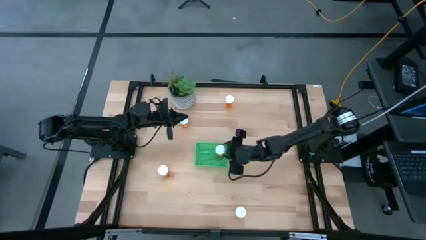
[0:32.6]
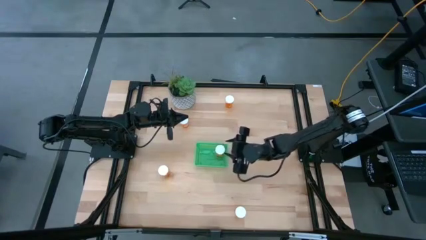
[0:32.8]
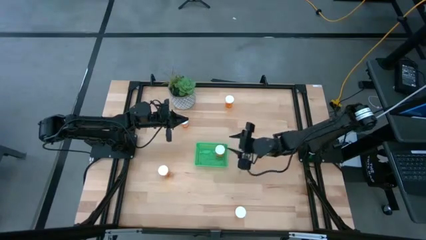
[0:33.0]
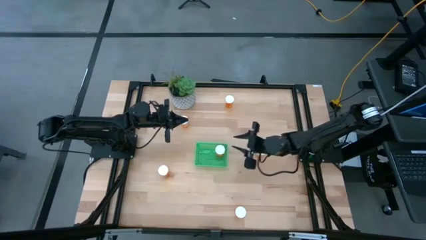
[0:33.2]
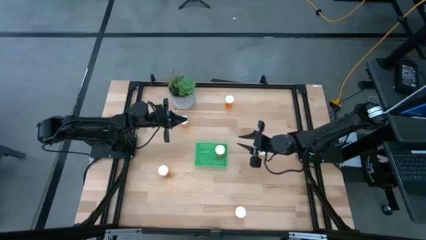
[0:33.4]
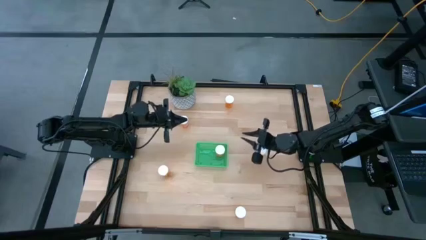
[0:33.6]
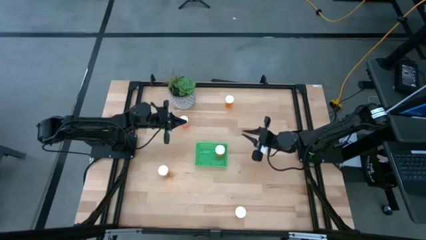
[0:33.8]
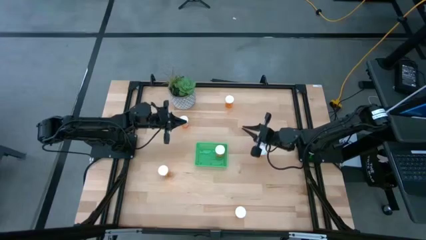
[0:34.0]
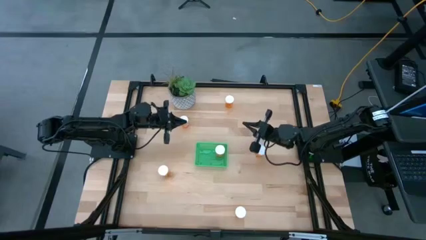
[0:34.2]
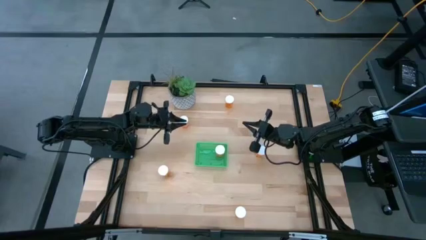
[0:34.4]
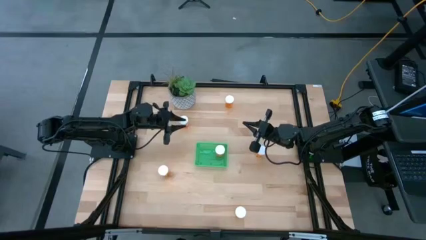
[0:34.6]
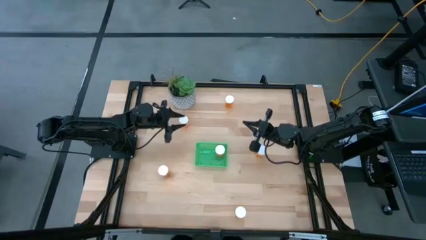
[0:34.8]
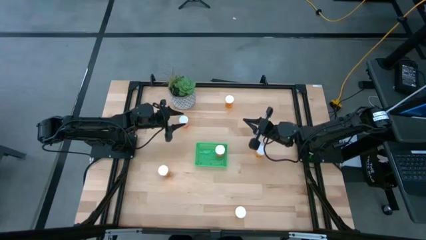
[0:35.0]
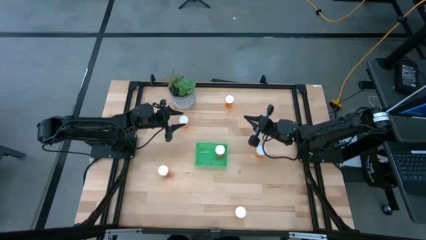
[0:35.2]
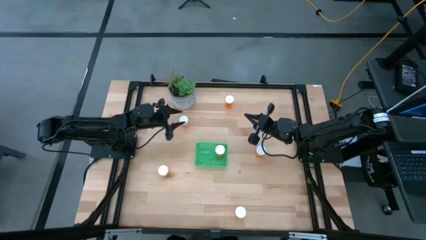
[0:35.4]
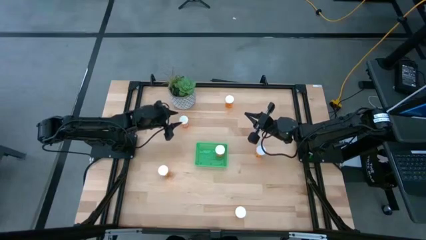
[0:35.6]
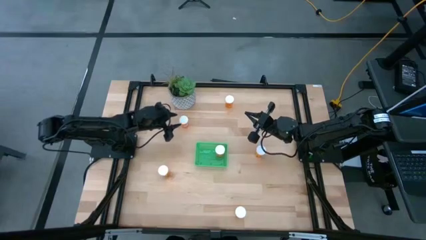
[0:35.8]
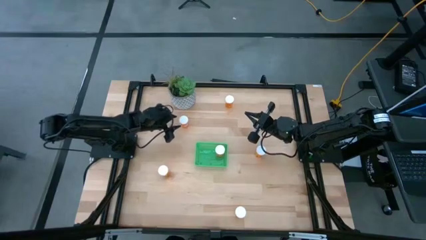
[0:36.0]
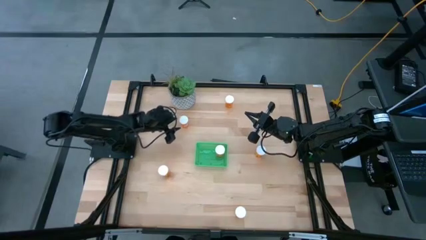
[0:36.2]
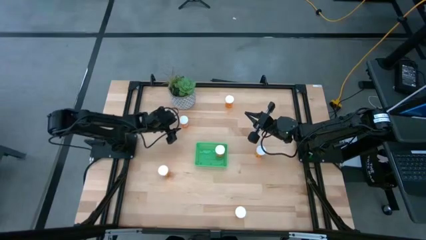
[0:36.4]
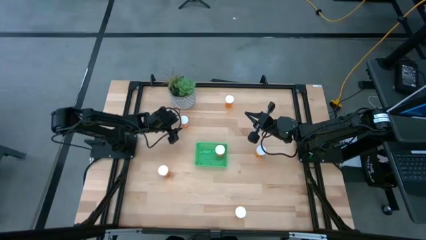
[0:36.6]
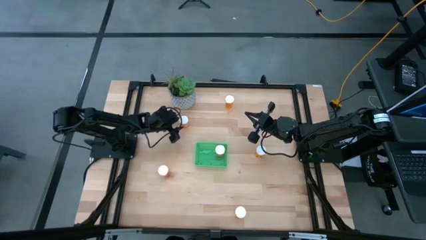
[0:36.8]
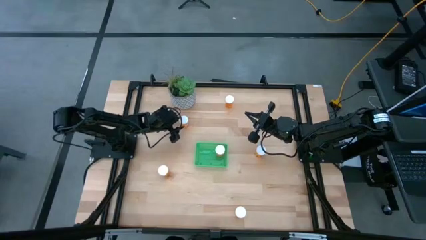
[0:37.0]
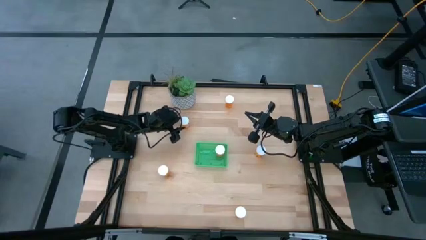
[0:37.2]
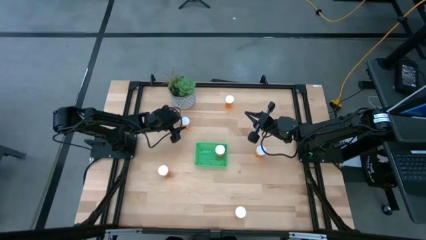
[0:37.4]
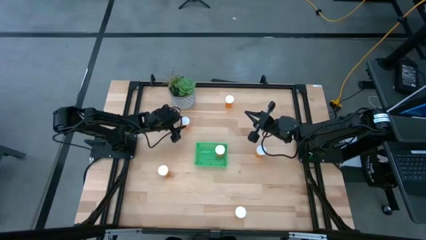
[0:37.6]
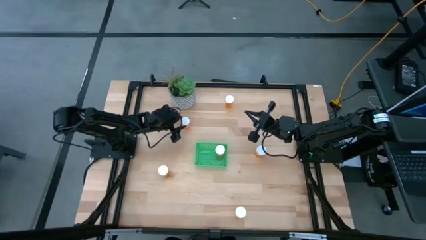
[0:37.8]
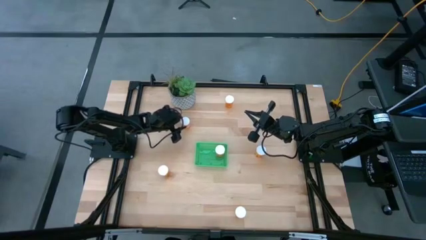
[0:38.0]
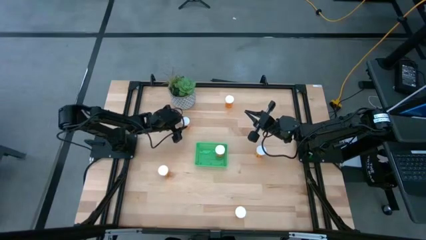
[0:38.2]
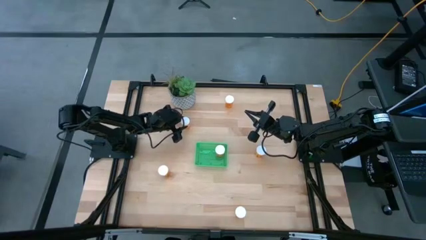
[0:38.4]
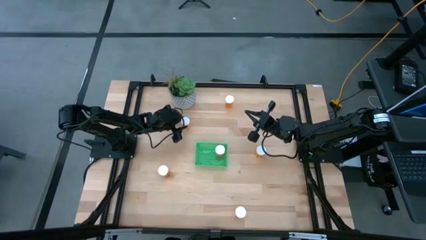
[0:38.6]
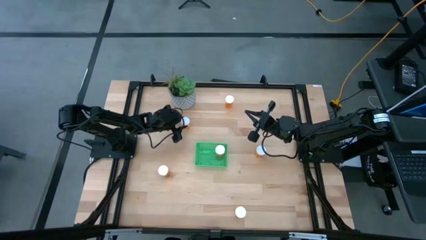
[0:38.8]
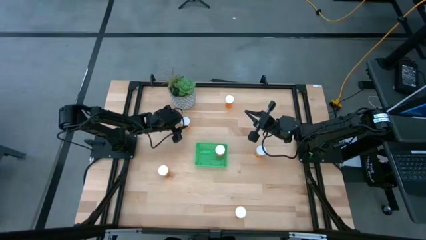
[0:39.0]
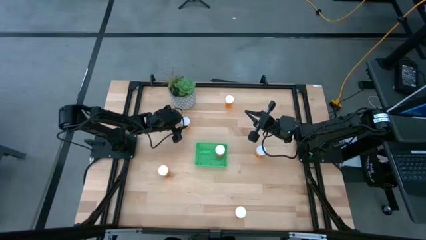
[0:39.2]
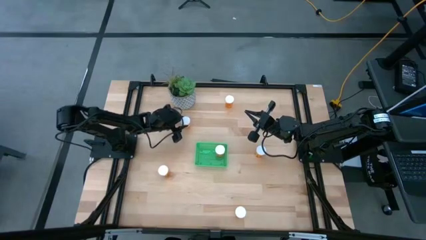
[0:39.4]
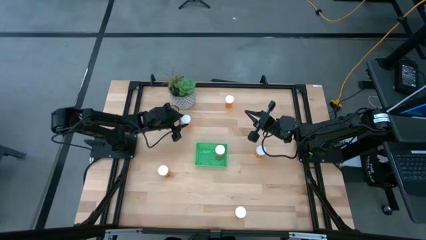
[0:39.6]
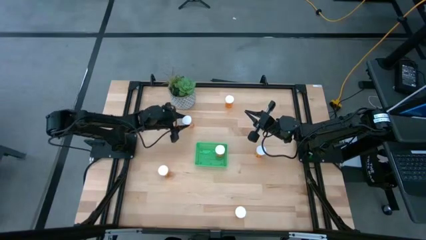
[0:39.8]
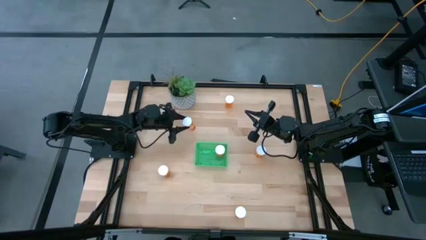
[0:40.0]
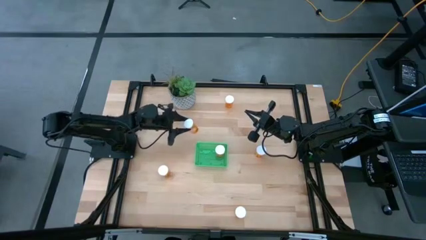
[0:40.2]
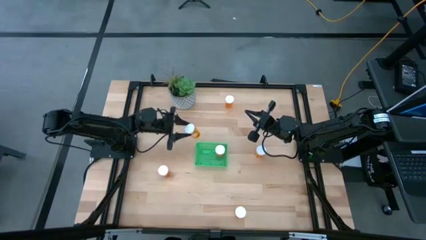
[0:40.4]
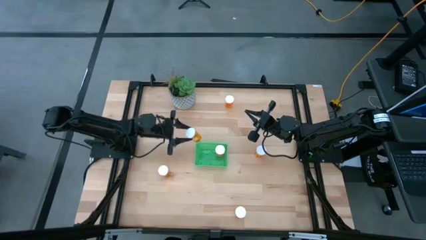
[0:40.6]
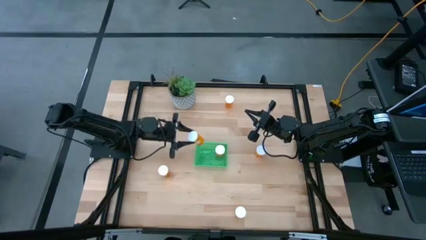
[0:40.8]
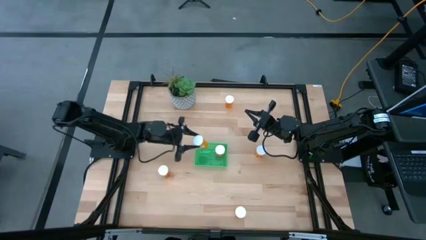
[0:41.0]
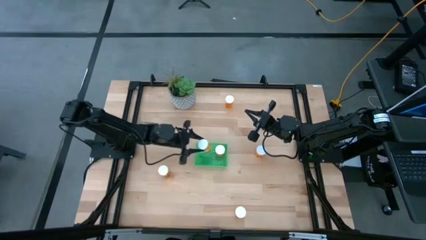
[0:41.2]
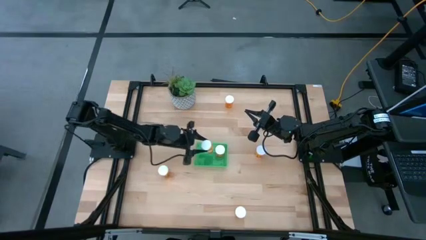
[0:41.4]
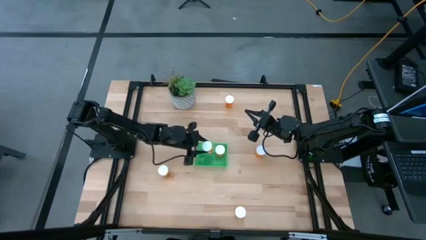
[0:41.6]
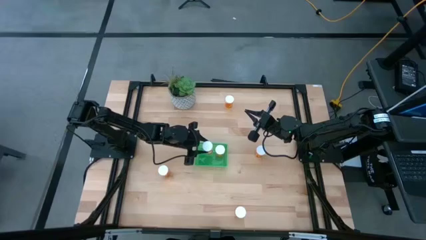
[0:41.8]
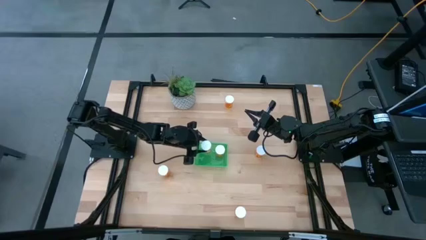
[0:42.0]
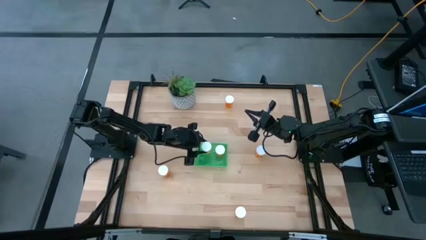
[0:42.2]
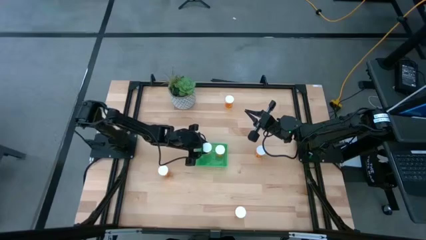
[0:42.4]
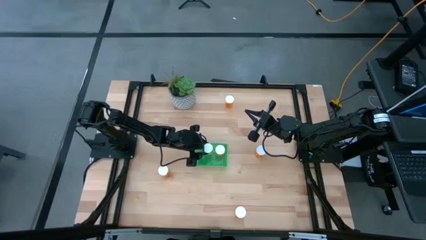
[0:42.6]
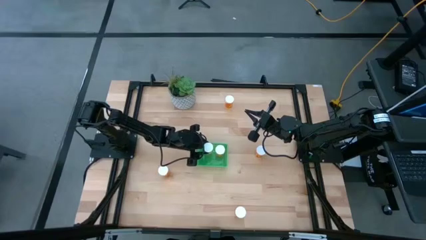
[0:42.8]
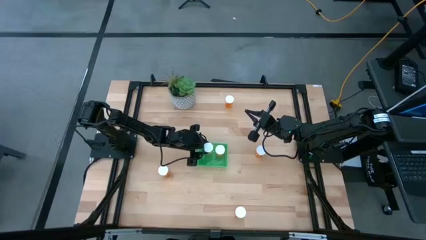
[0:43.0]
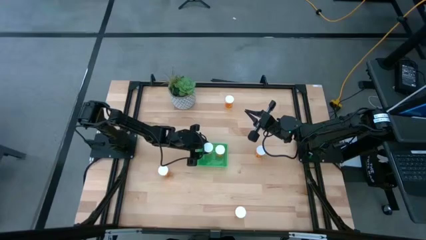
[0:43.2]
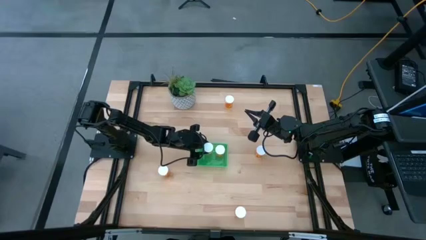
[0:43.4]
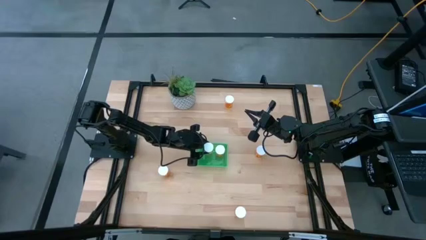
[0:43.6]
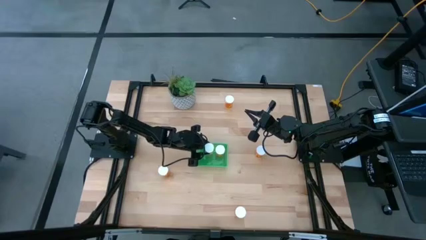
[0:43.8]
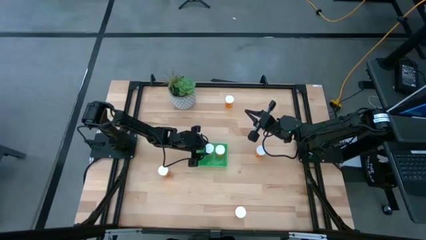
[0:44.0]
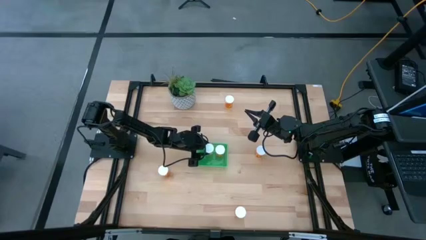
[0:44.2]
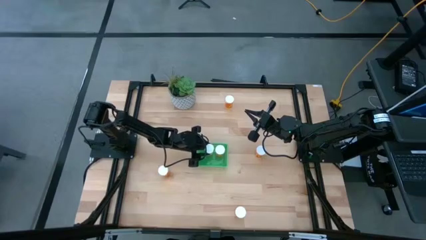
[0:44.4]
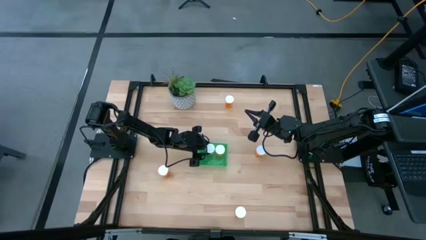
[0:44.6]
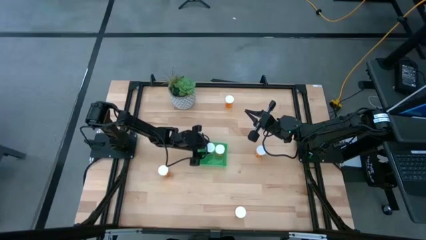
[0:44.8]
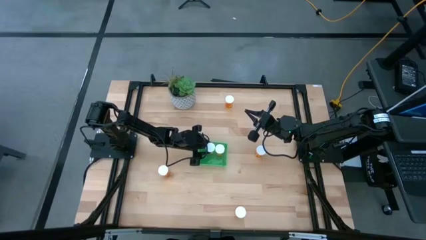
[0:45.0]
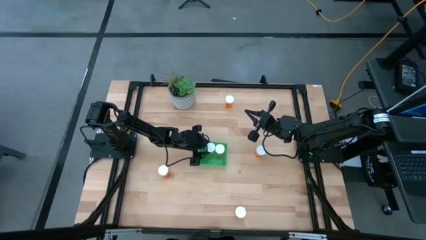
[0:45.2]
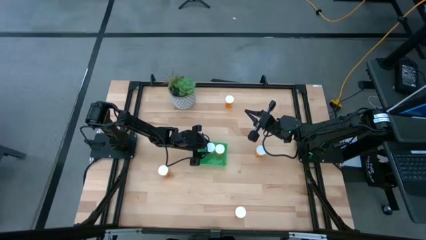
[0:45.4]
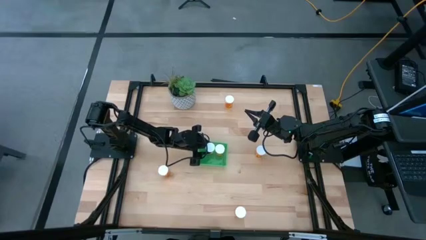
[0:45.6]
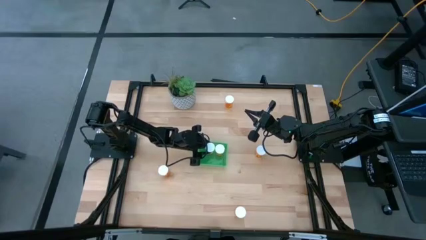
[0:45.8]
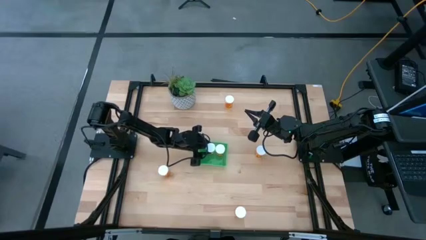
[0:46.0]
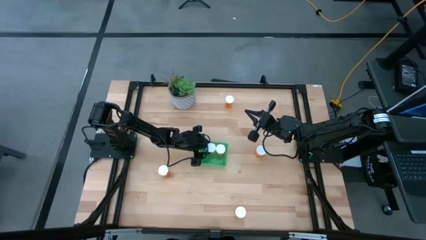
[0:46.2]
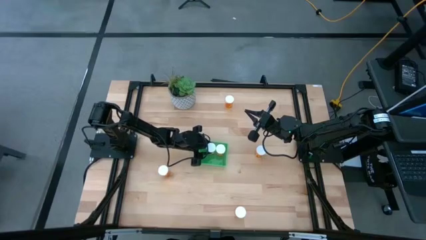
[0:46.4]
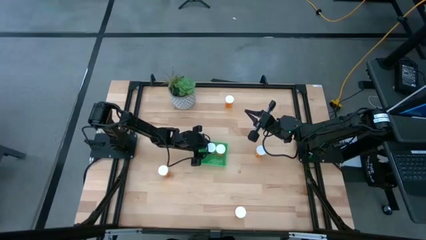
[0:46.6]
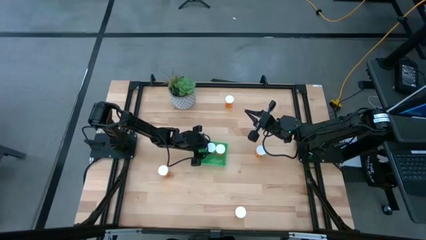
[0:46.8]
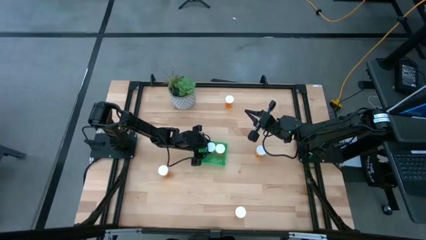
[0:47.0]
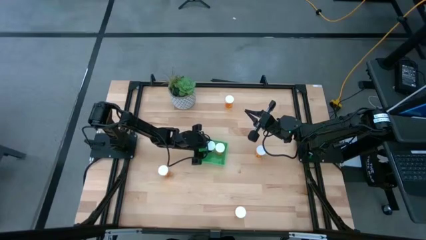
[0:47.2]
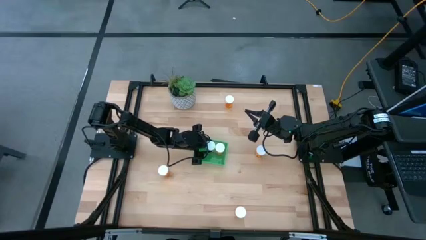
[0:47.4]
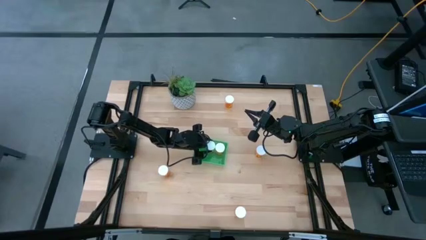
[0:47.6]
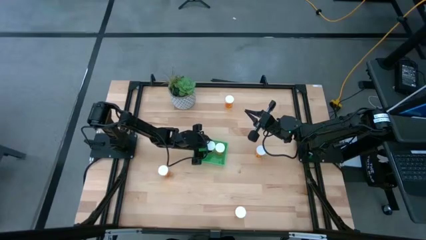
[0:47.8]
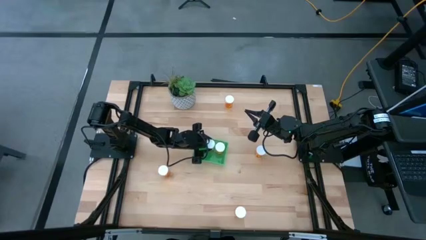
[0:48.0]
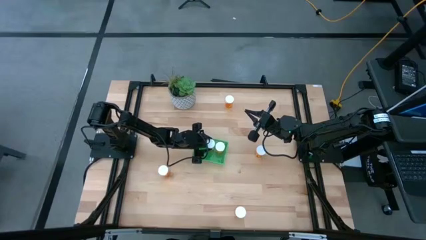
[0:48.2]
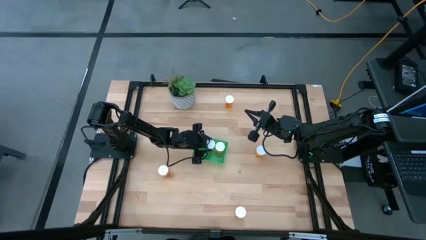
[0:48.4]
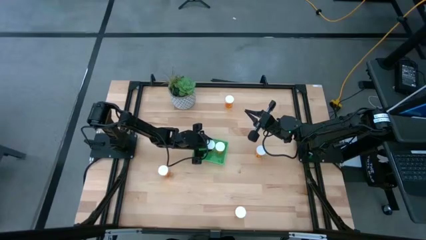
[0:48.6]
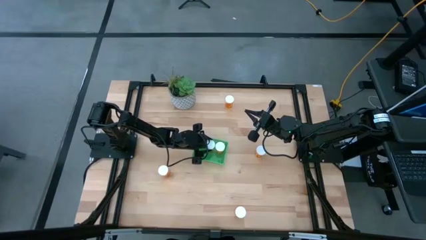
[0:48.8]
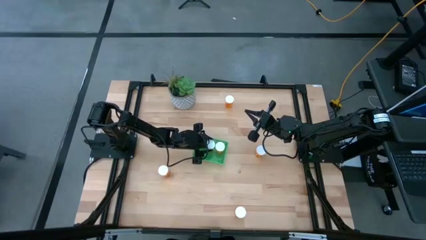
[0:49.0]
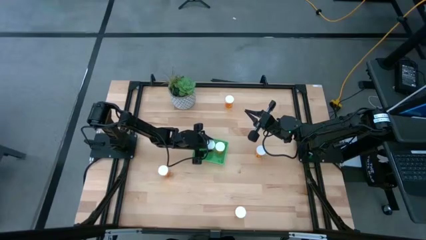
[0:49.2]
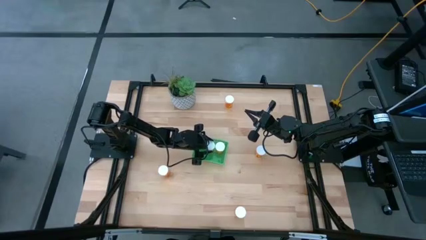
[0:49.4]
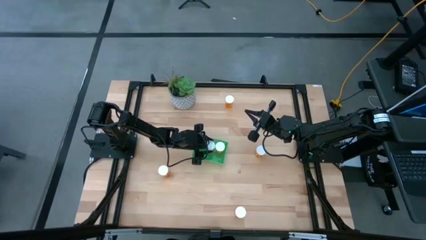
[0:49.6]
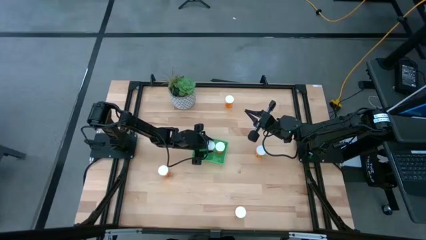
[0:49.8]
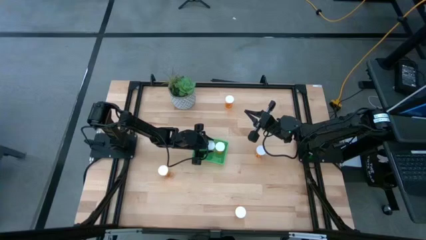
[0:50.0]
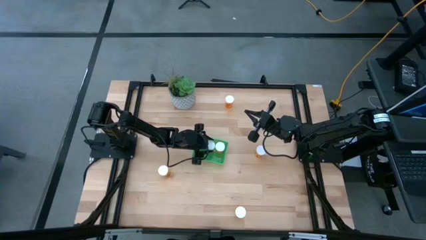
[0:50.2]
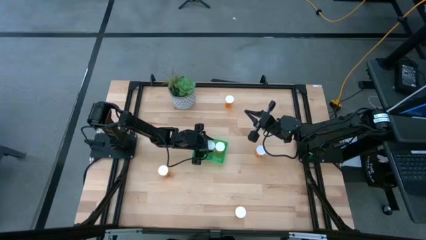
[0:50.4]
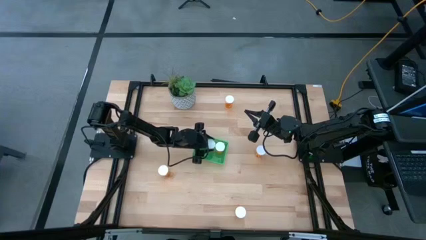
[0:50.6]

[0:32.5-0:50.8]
Task: Pick and place pill bottles into a basket
Put the orange medicine bottle into the green bin
